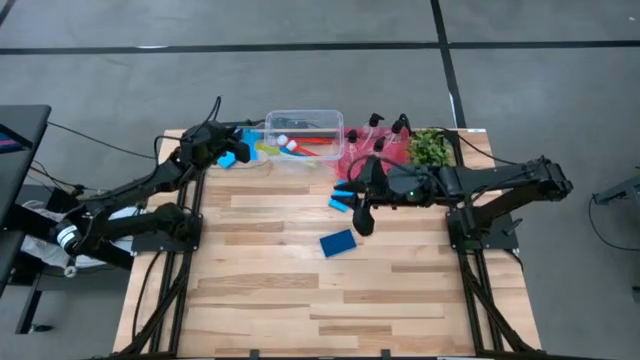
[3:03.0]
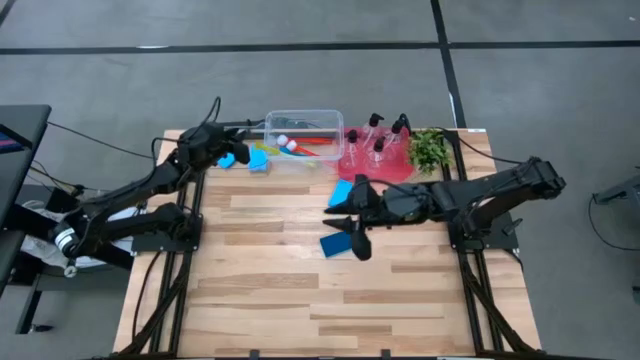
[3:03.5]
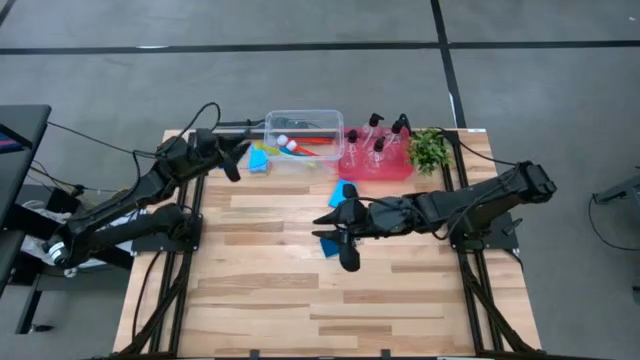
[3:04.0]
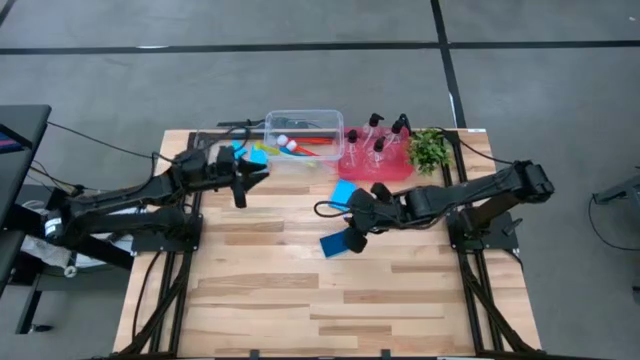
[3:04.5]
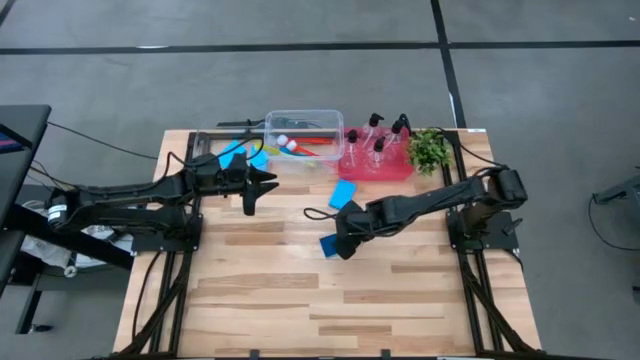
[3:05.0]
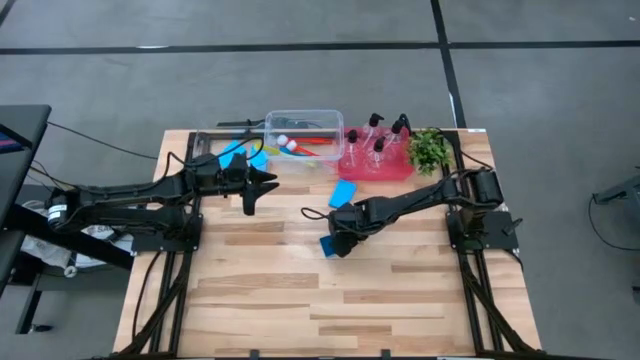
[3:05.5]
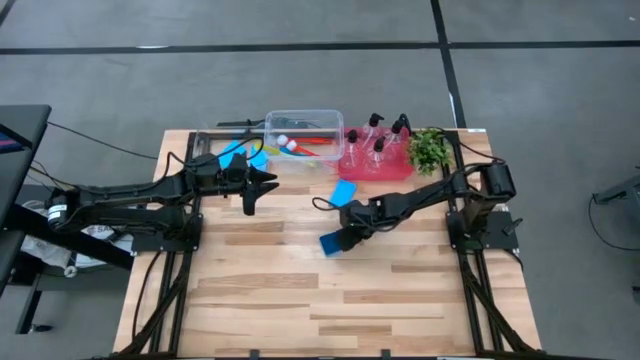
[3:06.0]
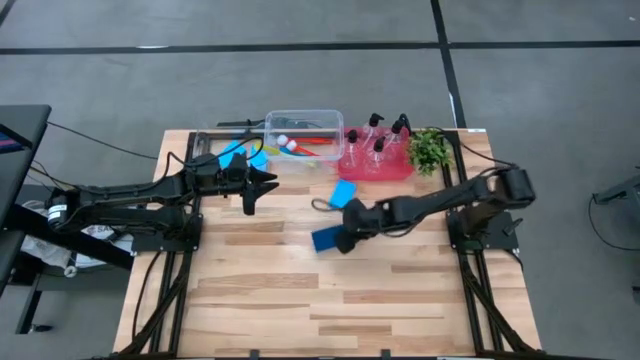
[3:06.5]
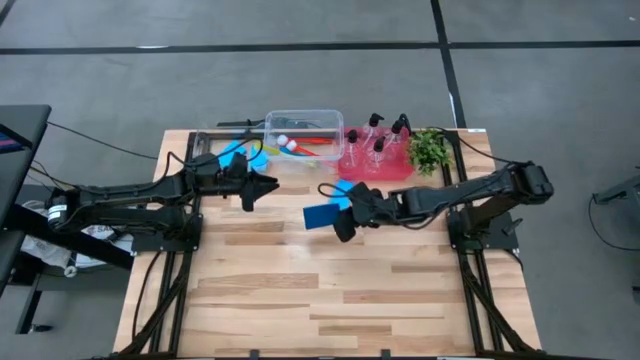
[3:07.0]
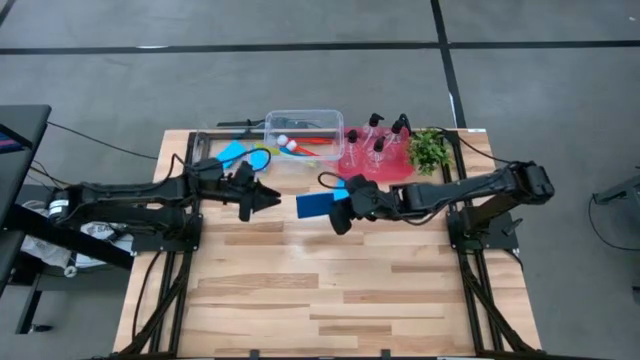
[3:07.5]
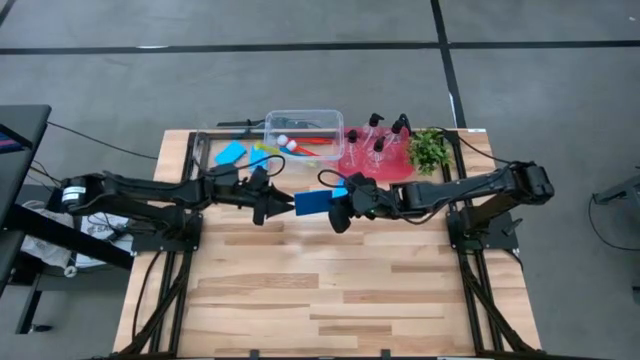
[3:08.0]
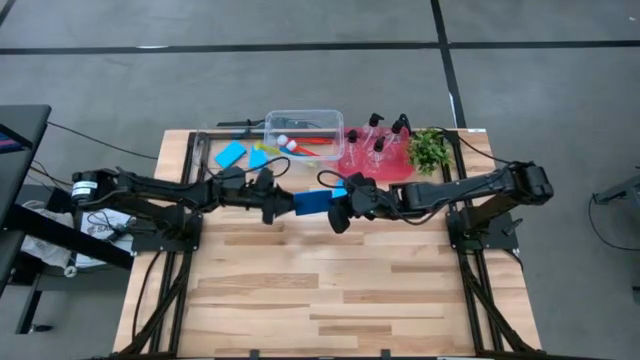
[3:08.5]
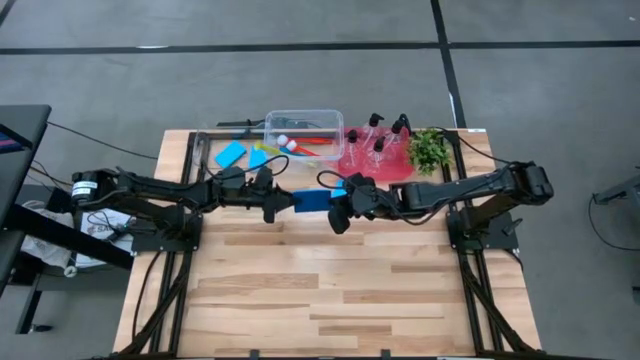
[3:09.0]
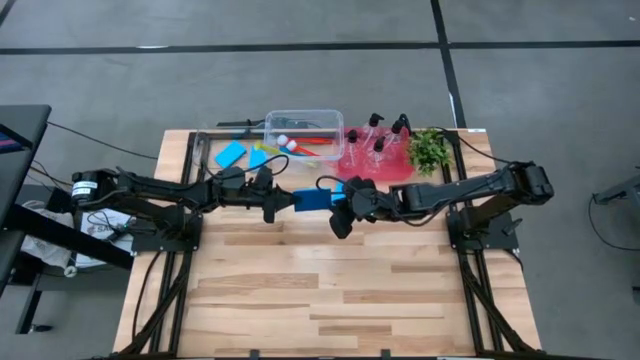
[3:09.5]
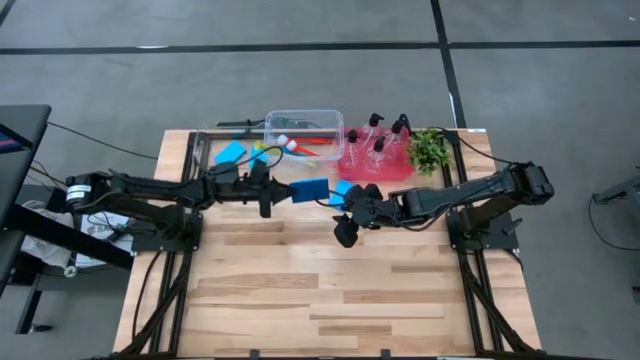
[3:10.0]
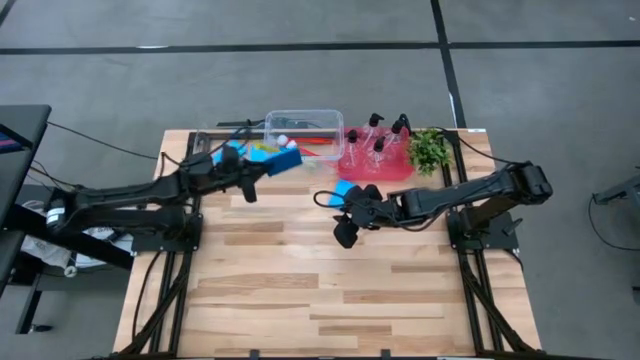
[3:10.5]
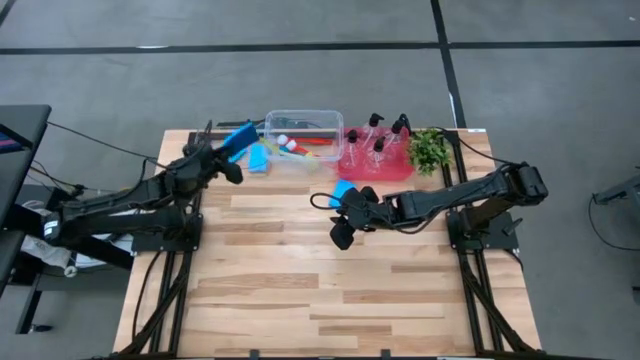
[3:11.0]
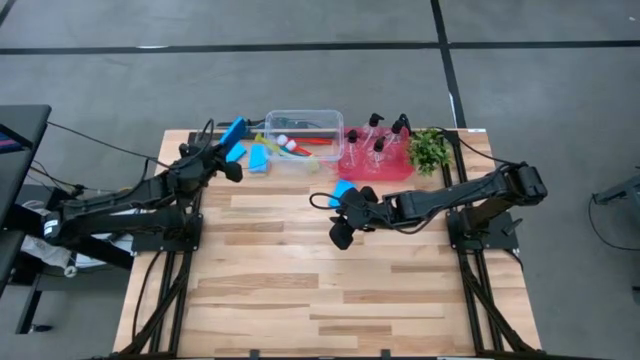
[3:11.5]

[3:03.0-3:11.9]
Task: Pick & Place Kitchen Sink Supplies
Put the blue sponge into the transparent bin

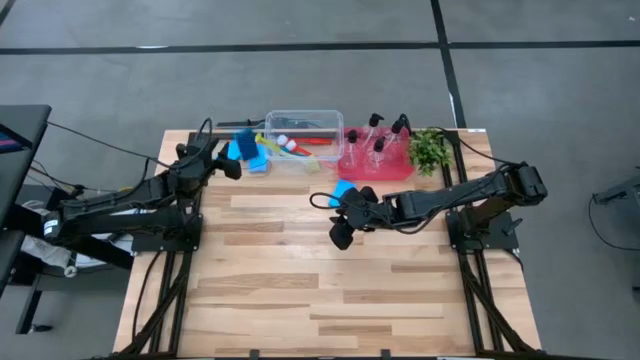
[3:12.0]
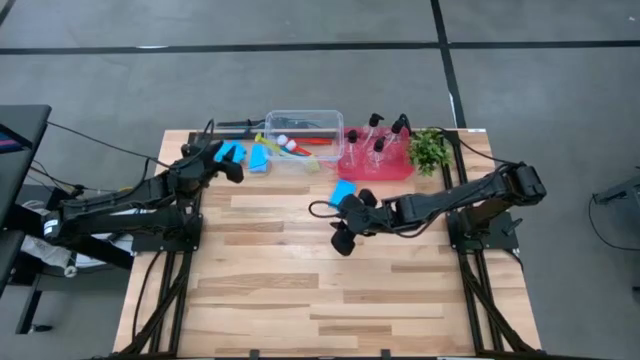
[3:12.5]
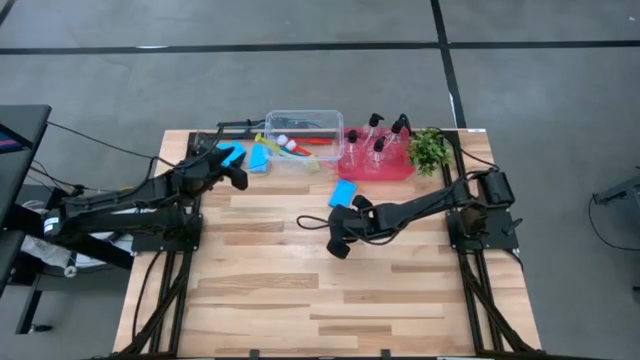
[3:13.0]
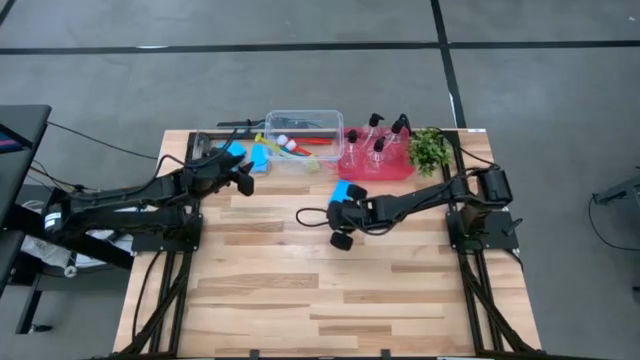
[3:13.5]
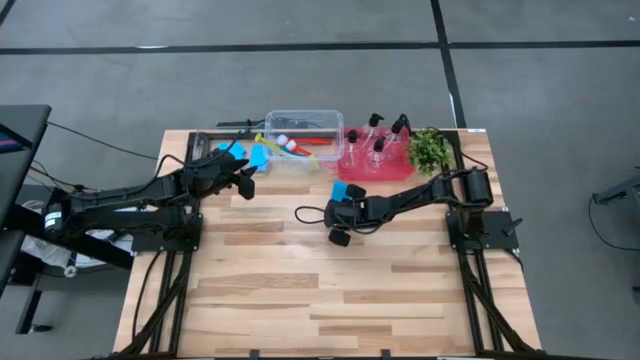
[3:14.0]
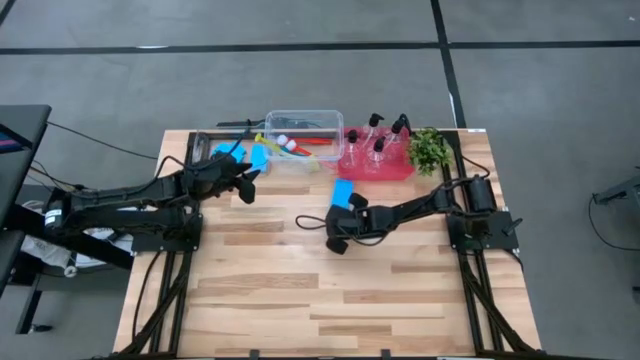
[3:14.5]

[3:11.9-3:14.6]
Put the blue sponge into the transparent bin

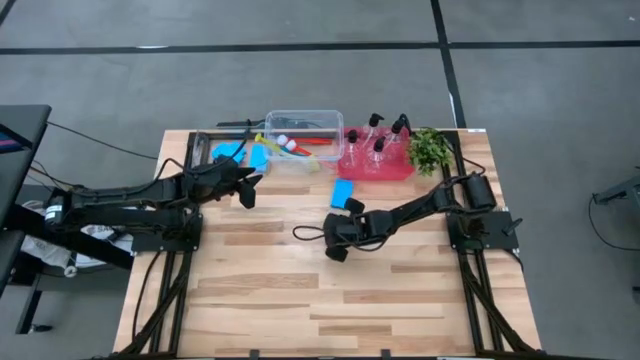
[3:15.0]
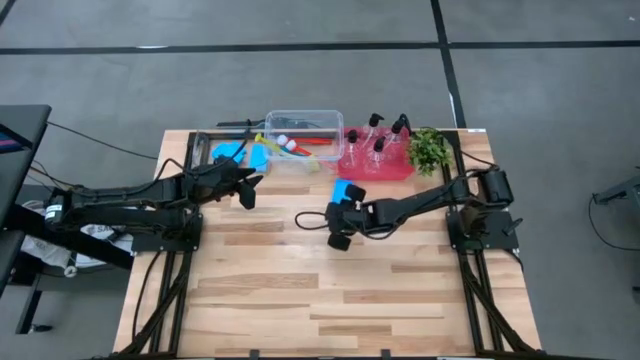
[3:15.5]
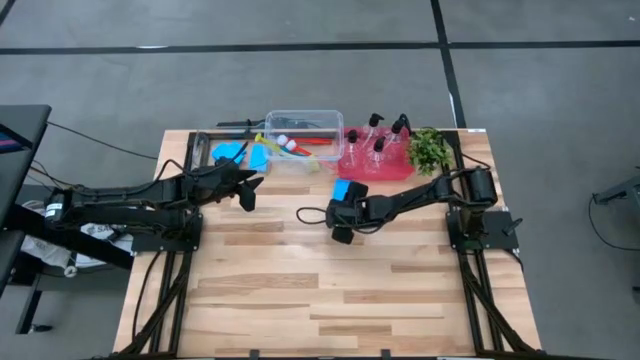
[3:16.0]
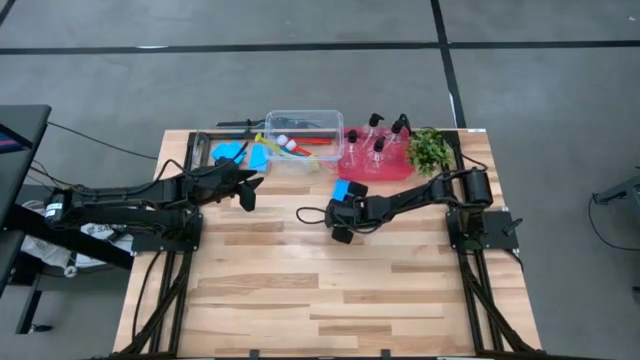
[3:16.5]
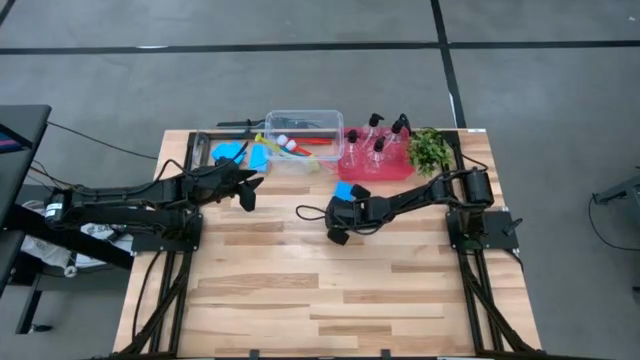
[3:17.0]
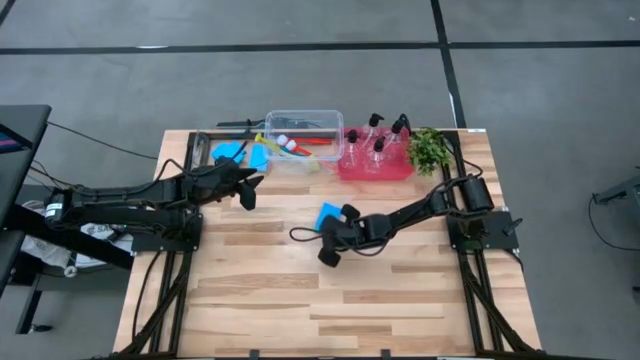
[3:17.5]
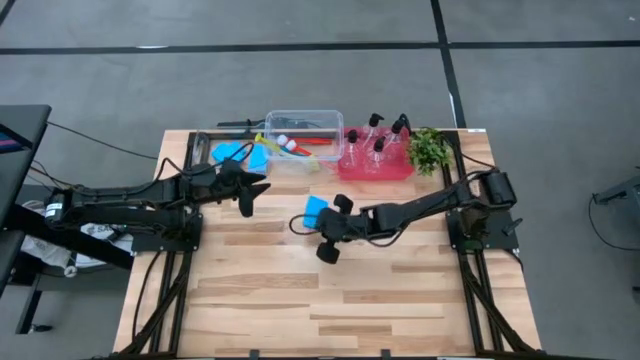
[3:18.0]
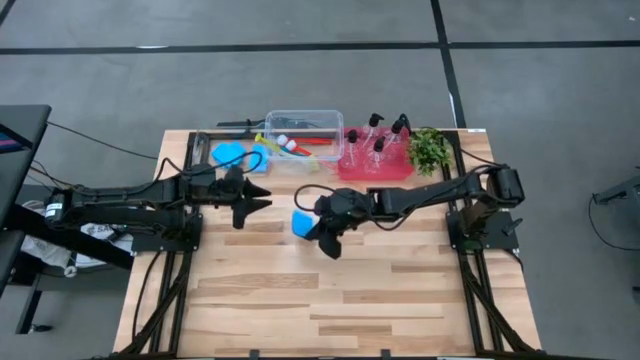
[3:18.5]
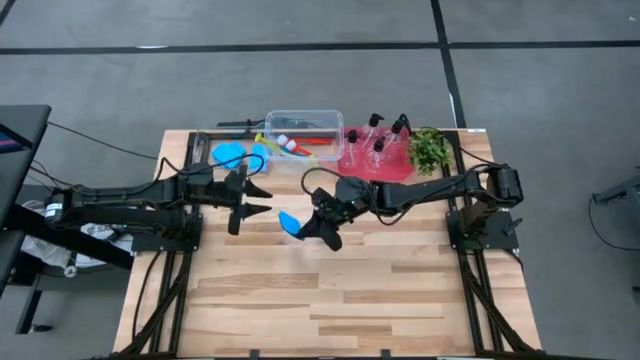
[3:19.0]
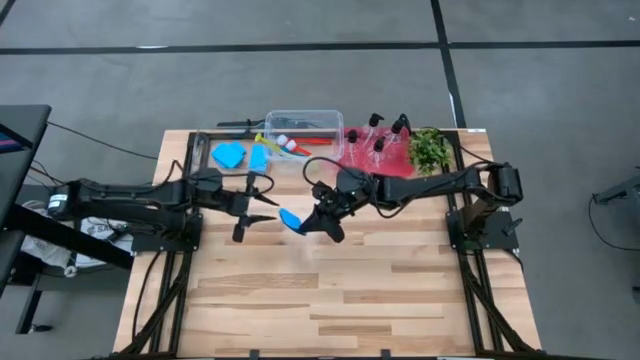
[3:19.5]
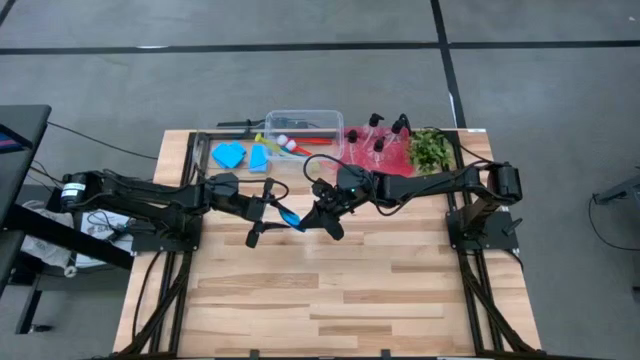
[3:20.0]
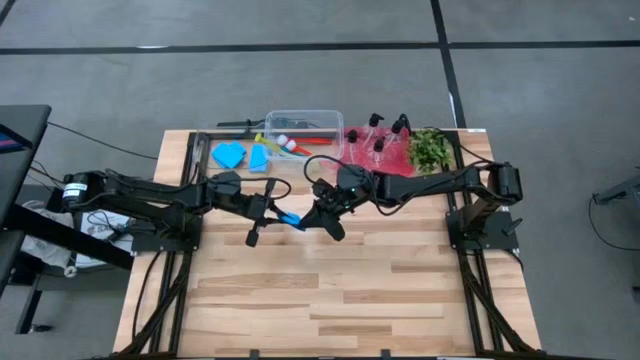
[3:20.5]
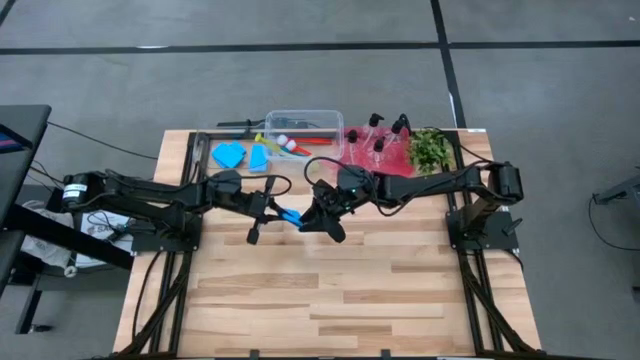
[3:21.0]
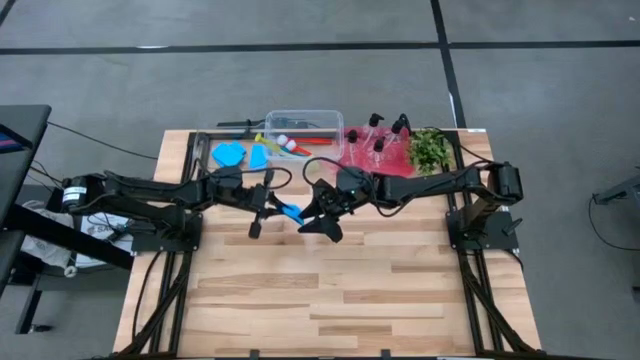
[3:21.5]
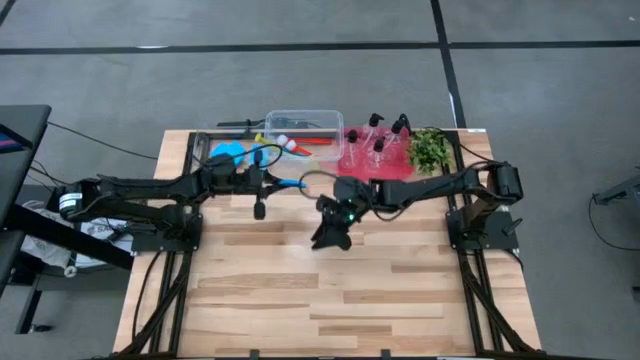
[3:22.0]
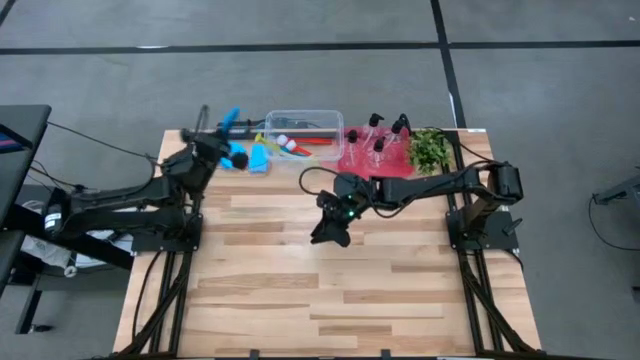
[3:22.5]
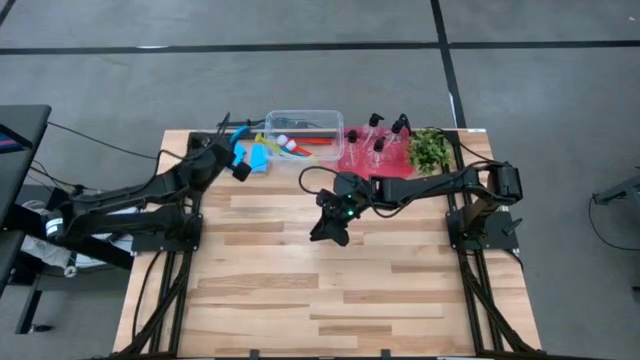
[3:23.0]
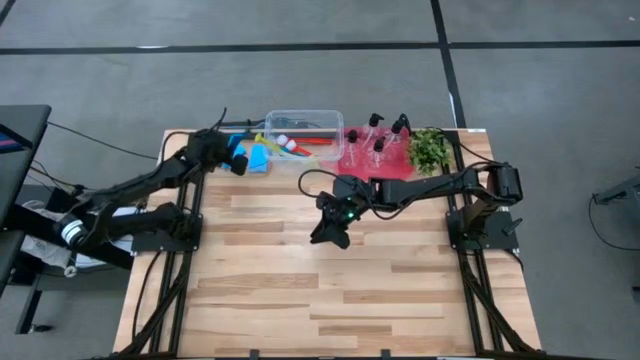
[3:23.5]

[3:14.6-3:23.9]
Put the blue sponge into the transparent bin
